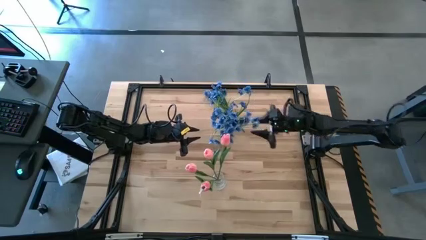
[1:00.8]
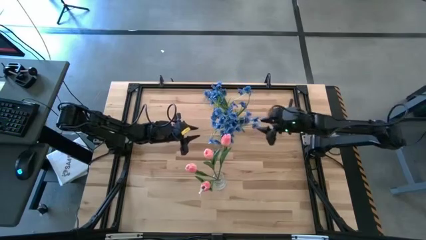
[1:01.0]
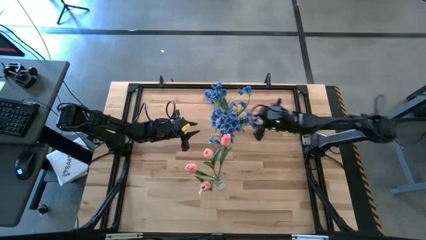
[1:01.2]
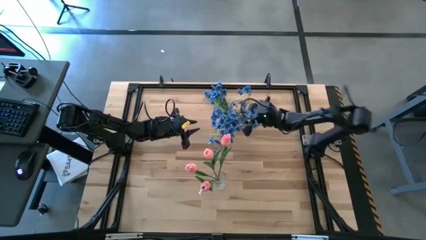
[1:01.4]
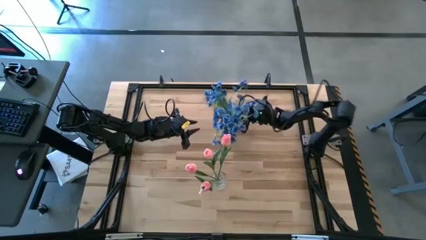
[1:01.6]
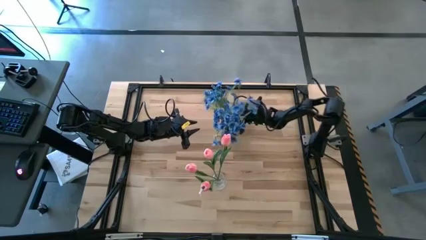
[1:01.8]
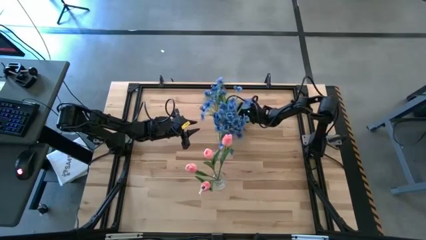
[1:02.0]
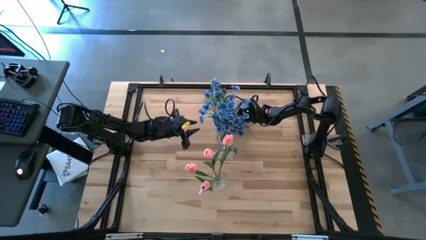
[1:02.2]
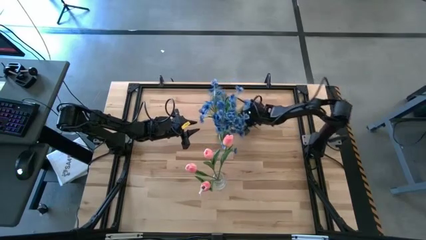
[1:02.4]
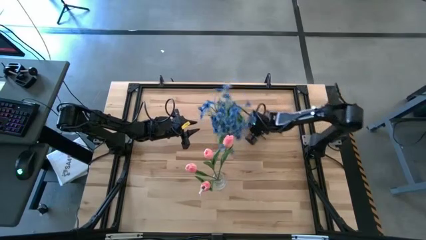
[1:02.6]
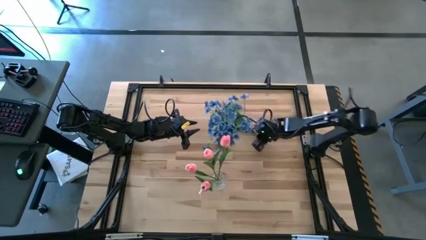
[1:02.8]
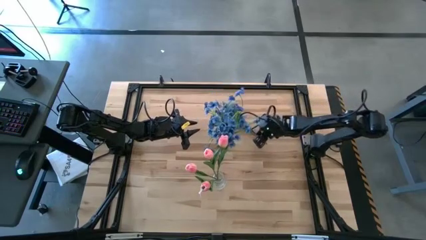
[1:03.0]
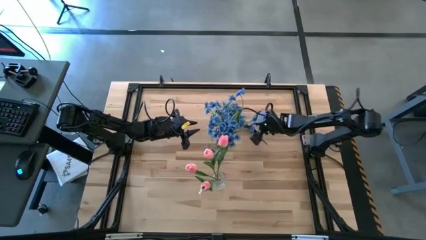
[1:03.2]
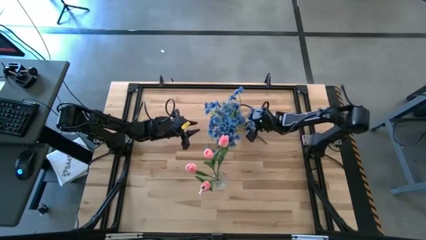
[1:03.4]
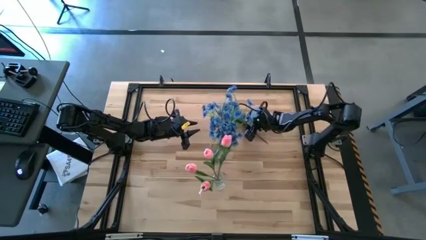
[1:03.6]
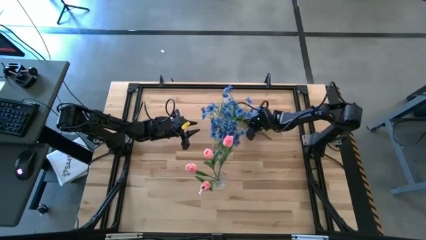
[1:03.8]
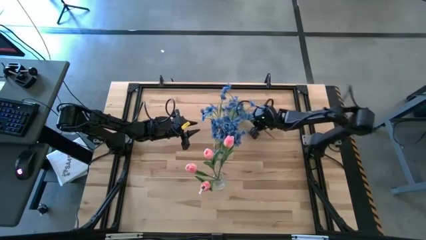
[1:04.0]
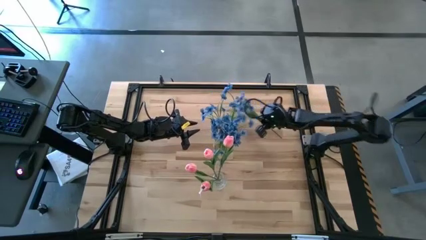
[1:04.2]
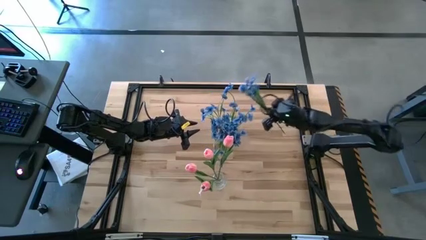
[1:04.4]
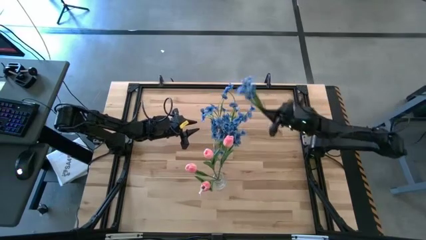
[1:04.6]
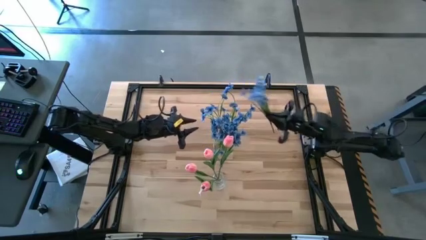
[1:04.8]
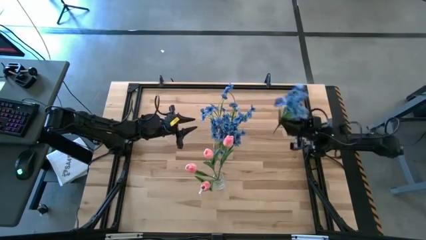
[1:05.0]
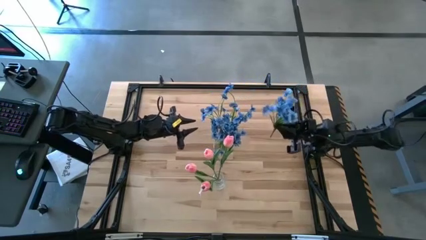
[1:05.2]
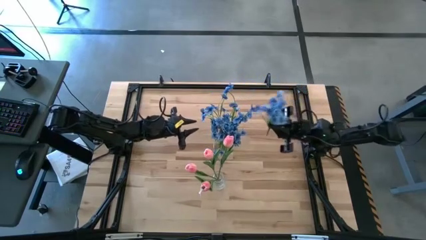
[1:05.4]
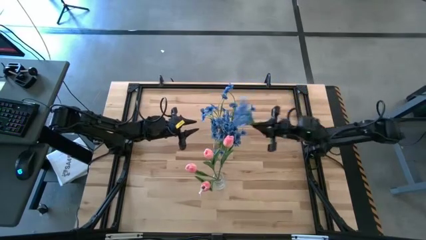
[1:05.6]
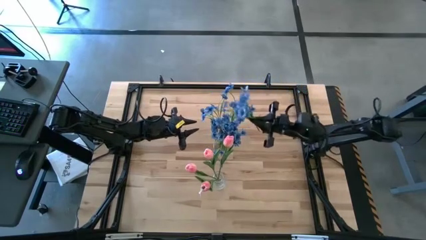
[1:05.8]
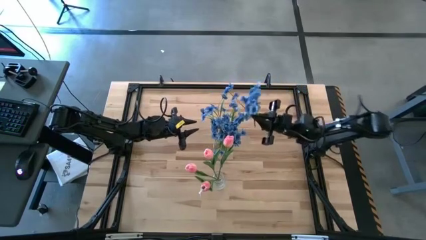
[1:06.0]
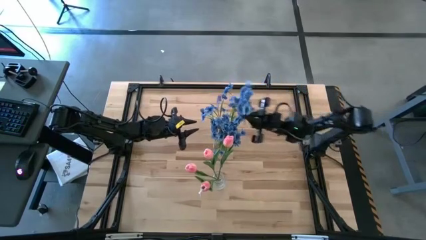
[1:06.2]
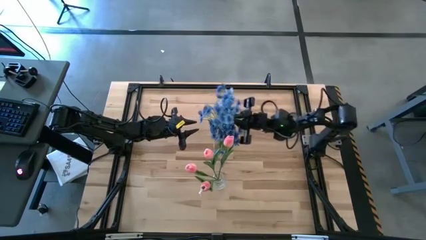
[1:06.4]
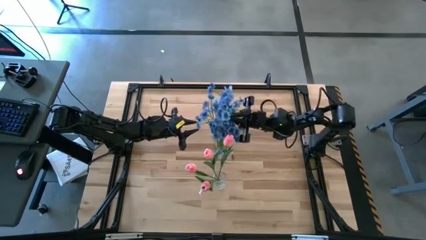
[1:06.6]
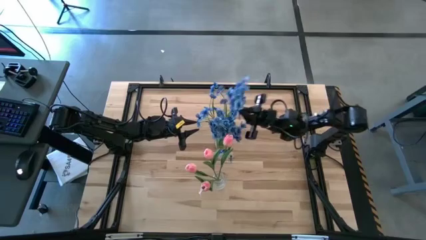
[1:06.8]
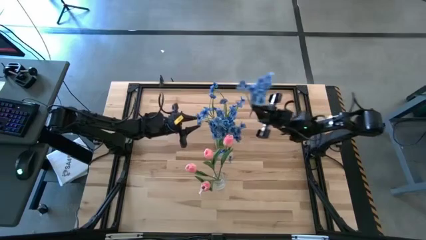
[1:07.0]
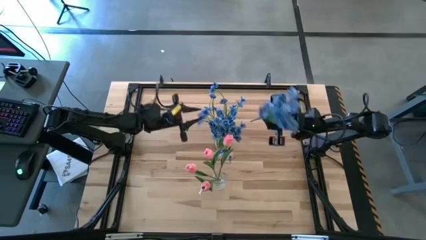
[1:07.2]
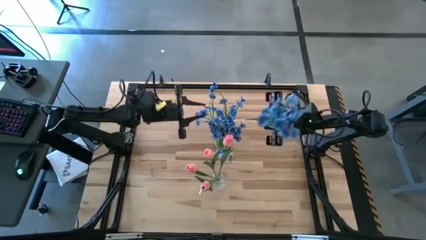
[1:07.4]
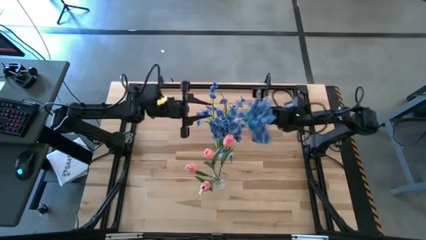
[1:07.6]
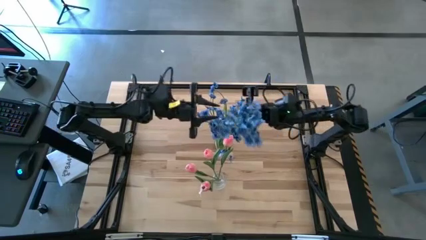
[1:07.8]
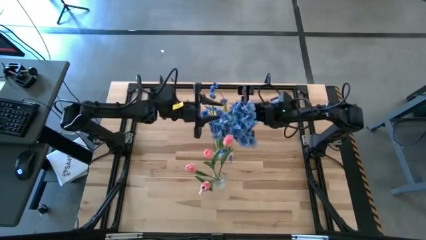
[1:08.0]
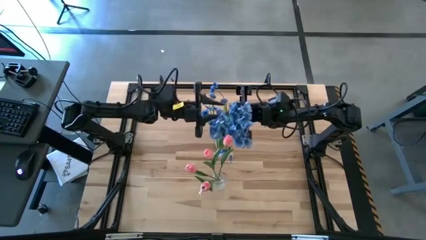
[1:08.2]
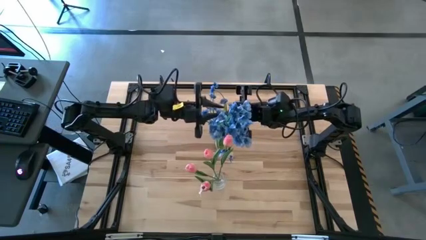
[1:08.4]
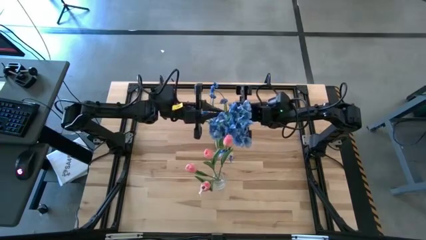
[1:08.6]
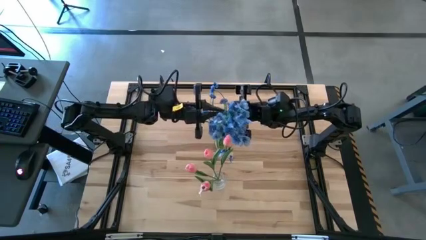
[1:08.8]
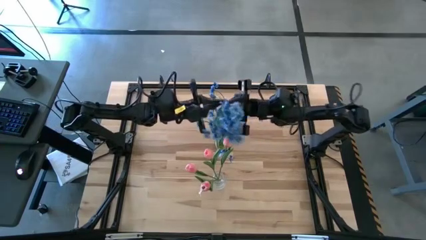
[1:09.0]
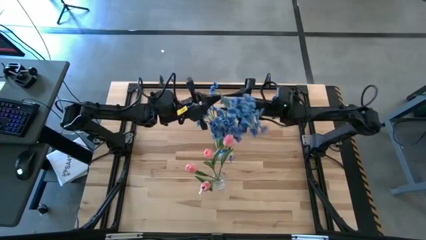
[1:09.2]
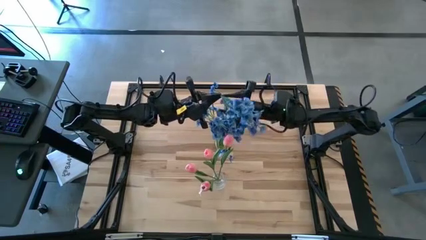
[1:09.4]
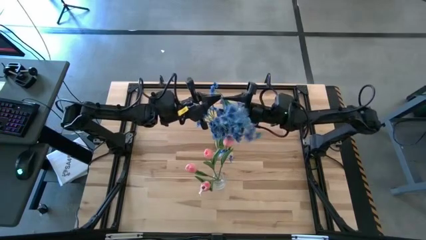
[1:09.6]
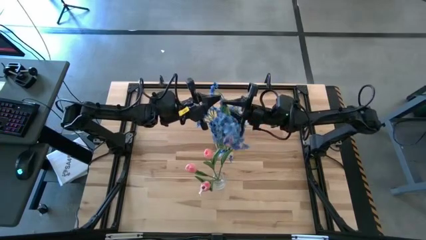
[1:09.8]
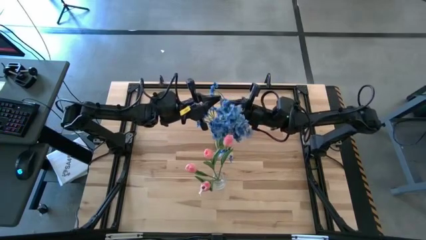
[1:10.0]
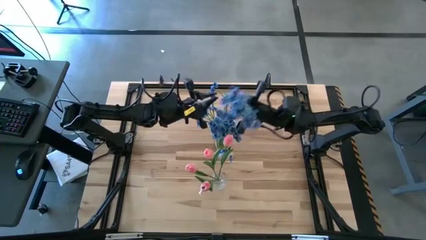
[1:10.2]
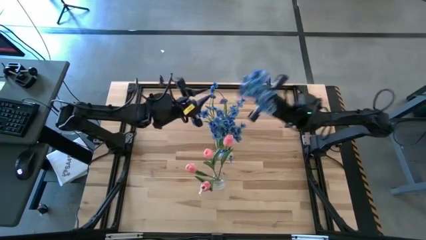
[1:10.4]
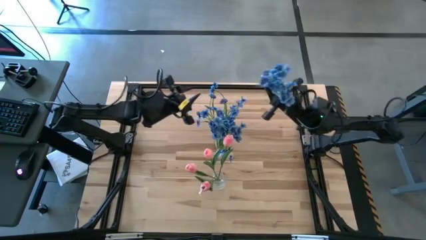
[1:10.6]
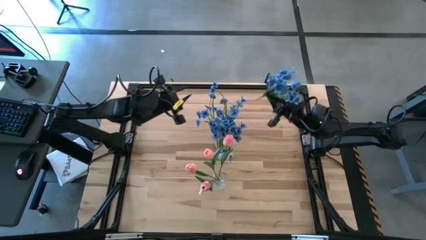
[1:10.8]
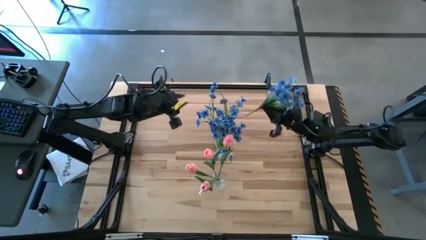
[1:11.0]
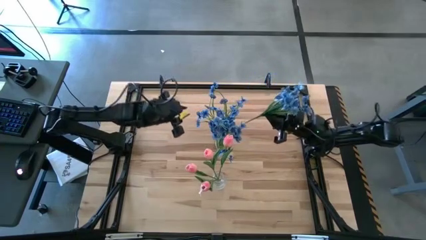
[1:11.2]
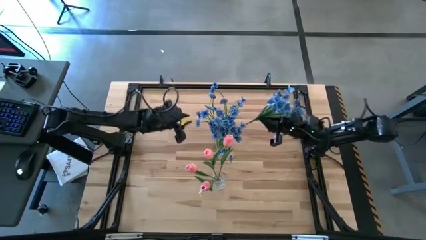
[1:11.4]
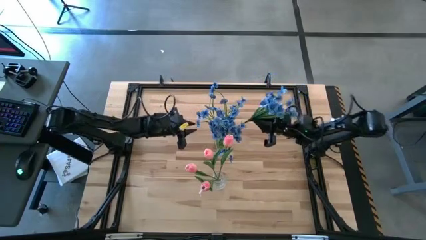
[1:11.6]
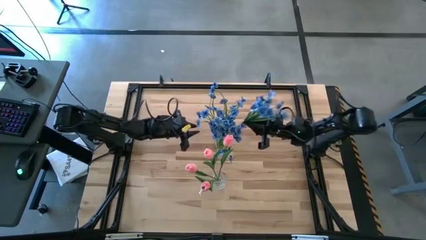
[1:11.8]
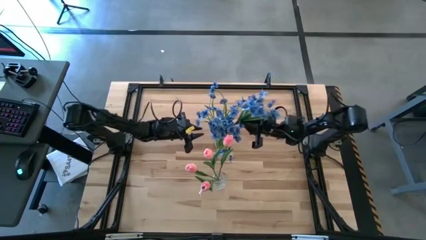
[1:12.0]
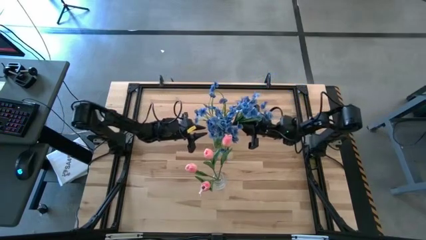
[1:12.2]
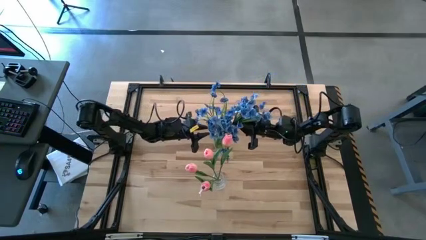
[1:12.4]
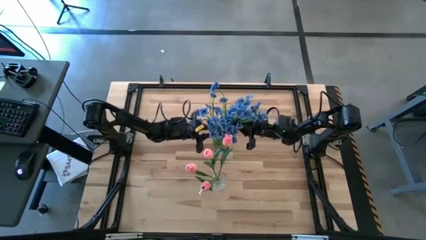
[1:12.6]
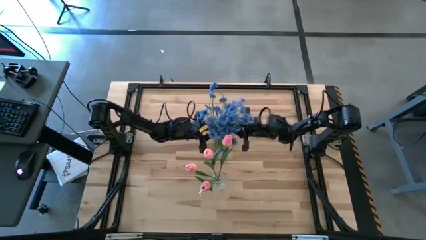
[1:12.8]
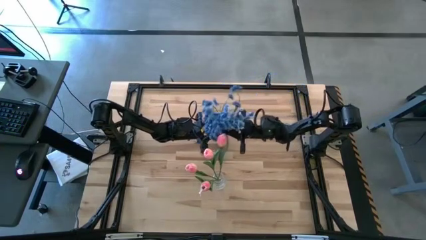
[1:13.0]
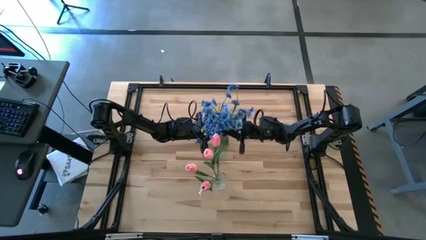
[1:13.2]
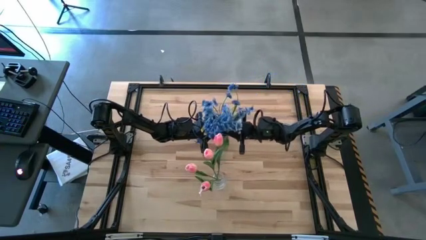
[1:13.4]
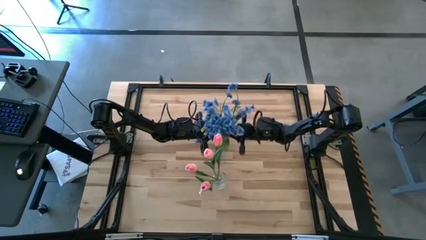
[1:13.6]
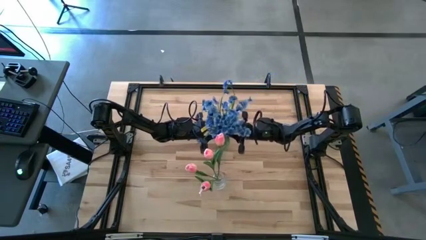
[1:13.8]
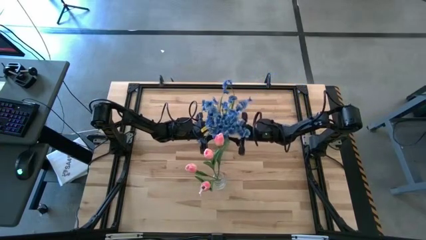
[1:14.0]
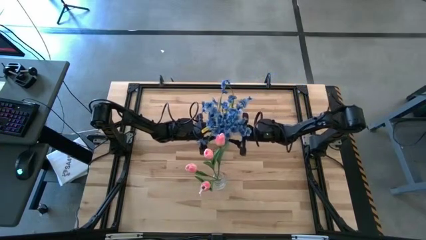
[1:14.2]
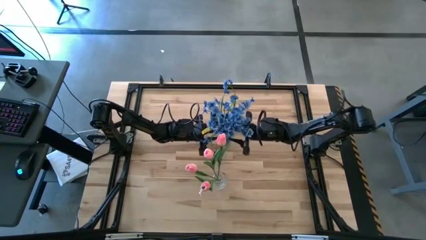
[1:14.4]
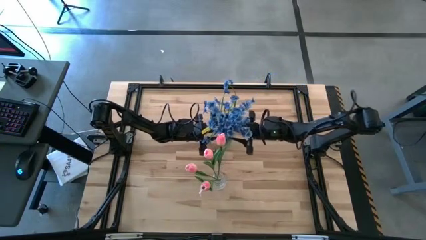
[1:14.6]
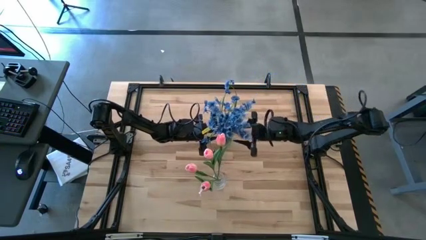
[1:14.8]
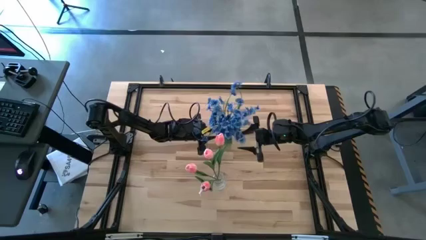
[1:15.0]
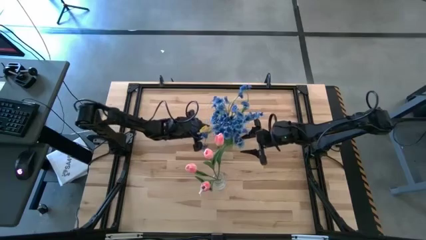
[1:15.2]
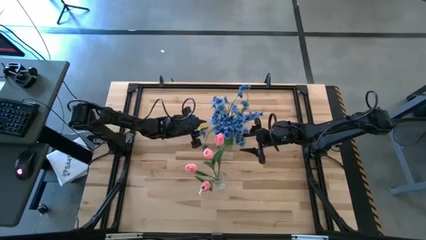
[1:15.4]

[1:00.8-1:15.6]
Task: Sort flowers into vase by color
Put the blue flowers into the green vase

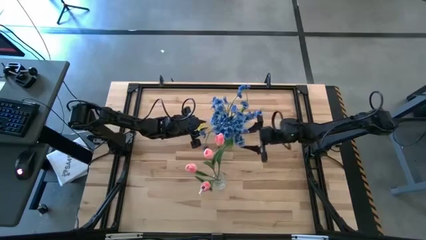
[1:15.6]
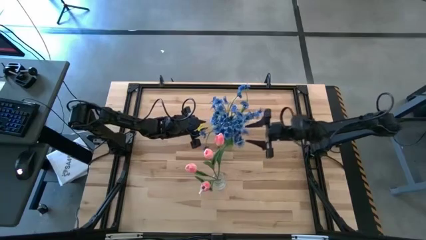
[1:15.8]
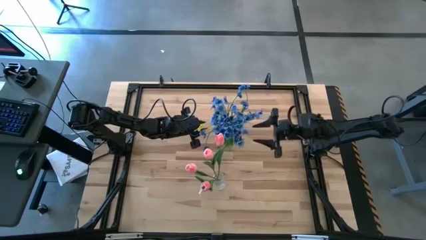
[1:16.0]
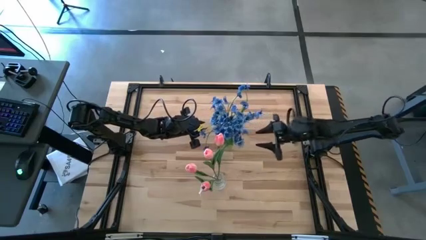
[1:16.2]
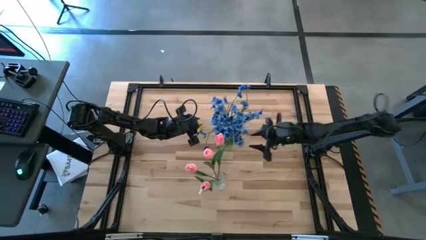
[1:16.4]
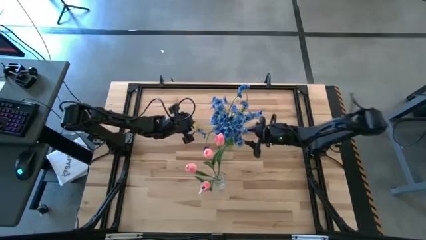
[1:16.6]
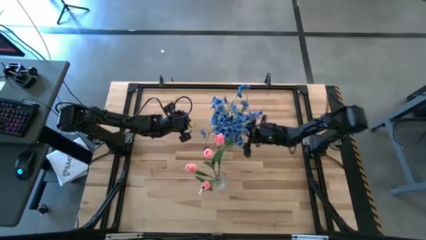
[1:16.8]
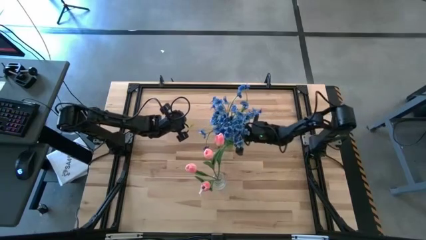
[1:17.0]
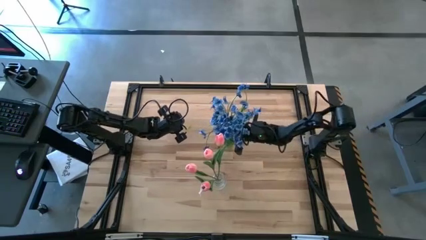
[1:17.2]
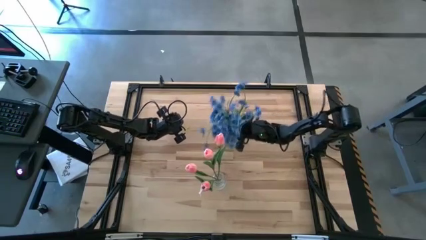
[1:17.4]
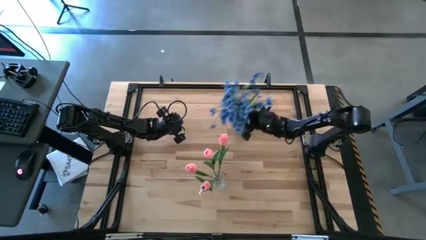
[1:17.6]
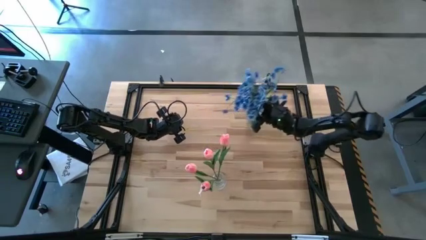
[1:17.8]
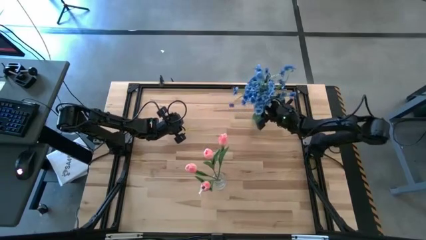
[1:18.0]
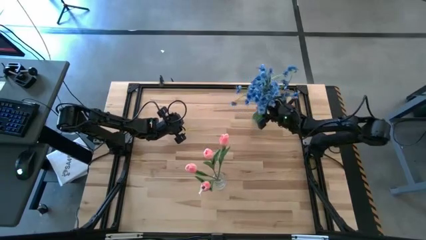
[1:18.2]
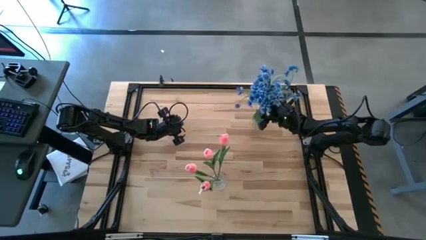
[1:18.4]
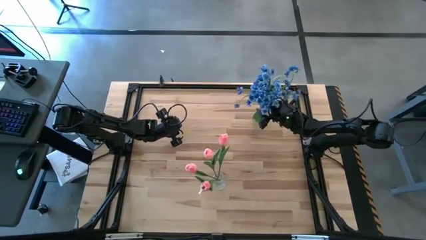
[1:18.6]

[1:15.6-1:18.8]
Move the green vase to the top right of the table
